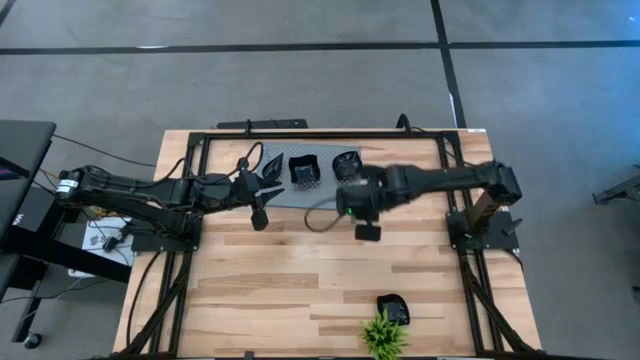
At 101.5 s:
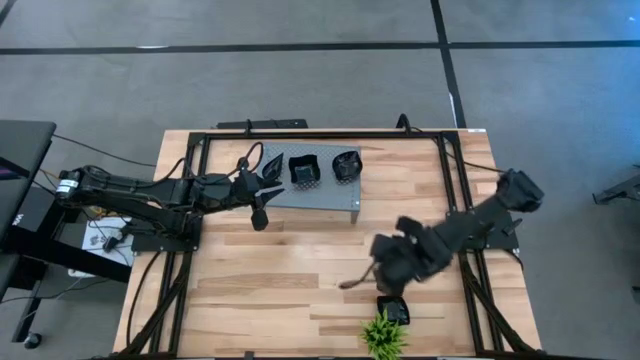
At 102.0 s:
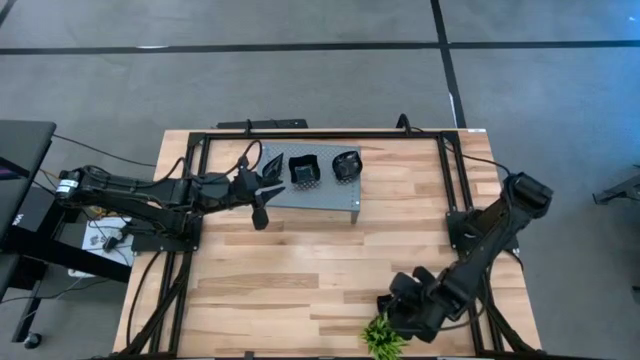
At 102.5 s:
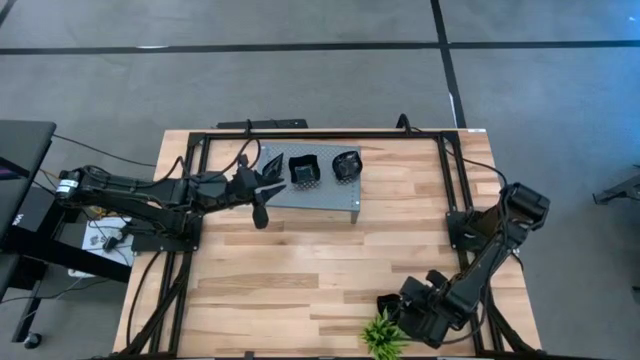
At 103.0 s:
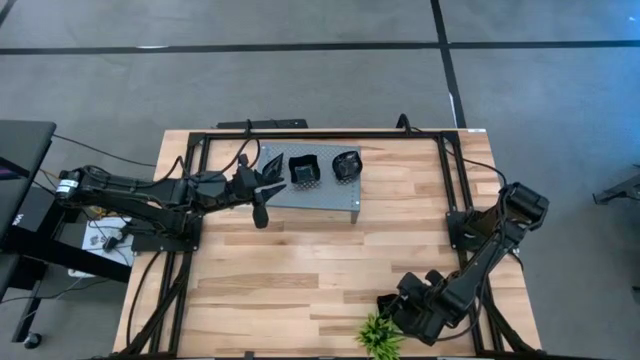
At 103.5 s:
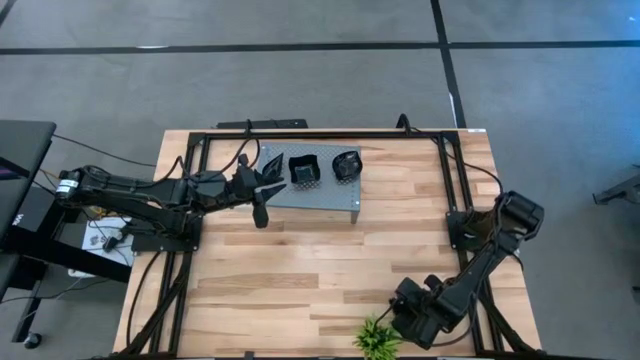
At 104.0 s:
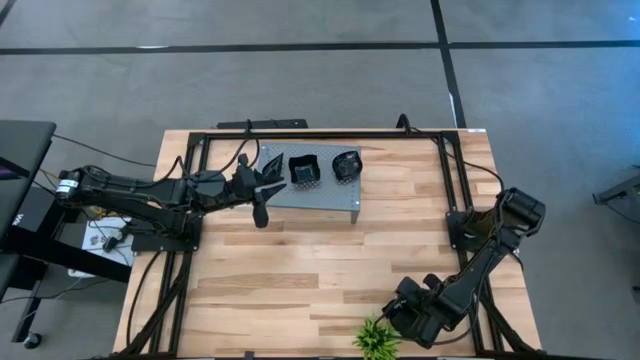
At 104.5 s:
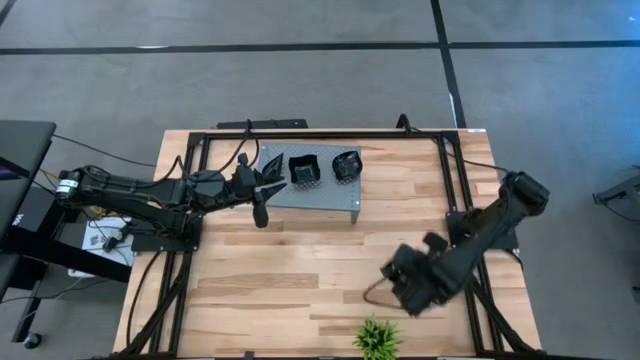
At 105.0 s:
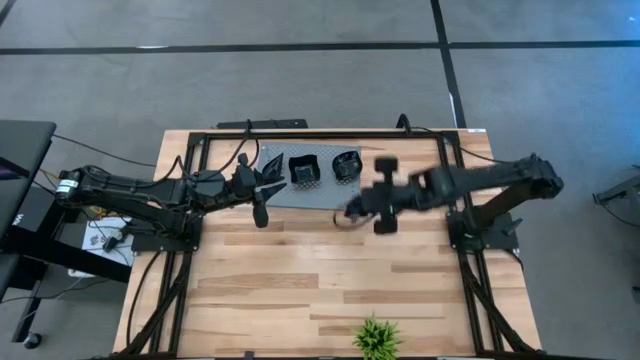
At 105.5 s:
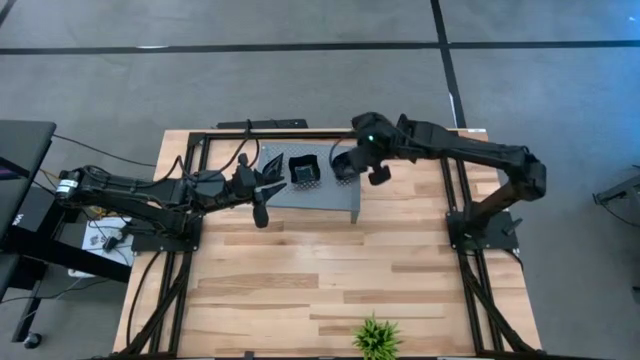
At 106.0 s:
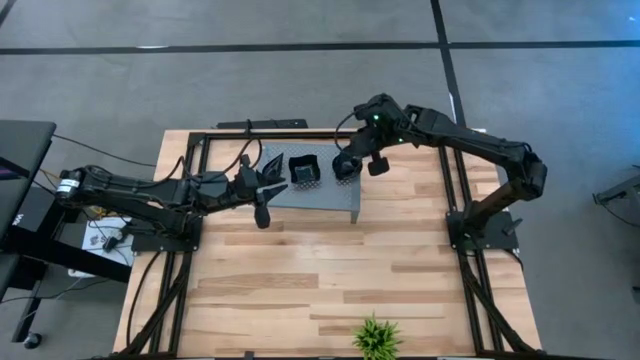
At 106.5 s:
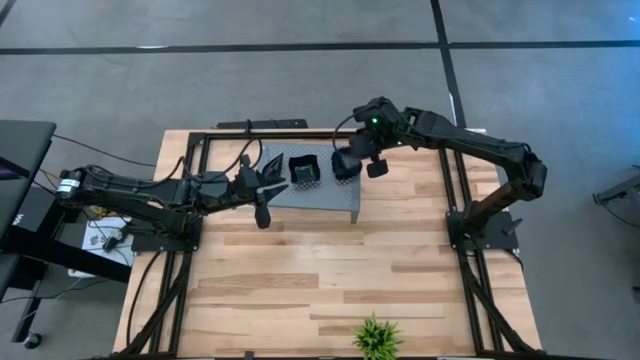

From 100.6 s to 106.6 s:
Task: Pick & Place Mini shaped plates
Stack the black leaf-shaped plate on top of the black leaf-shaped plate on the shelf

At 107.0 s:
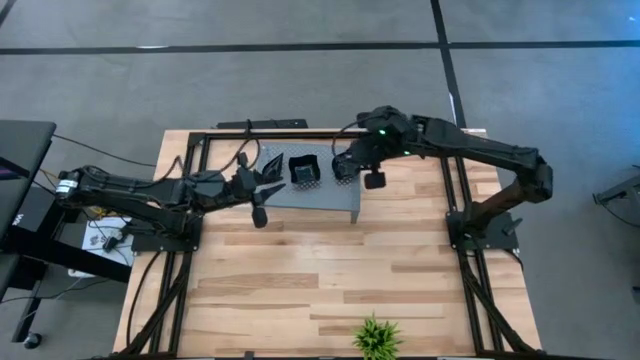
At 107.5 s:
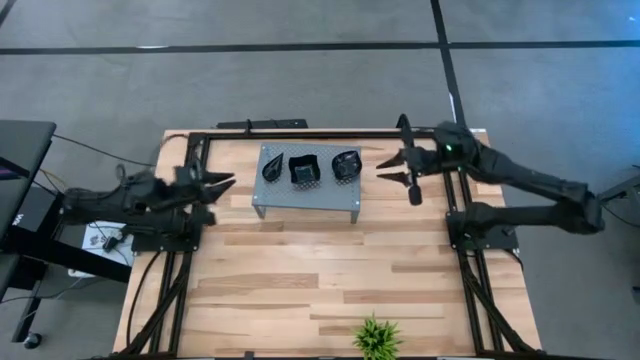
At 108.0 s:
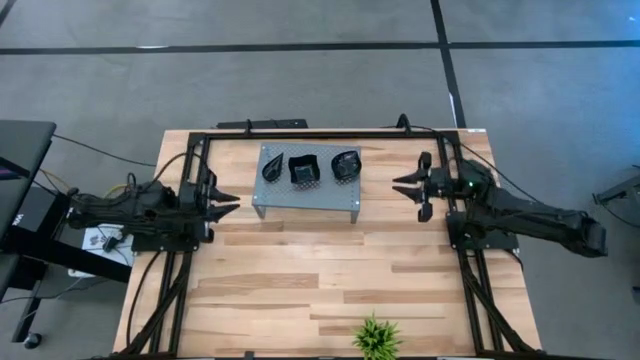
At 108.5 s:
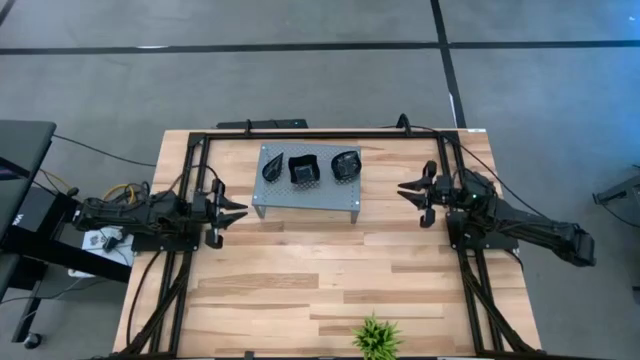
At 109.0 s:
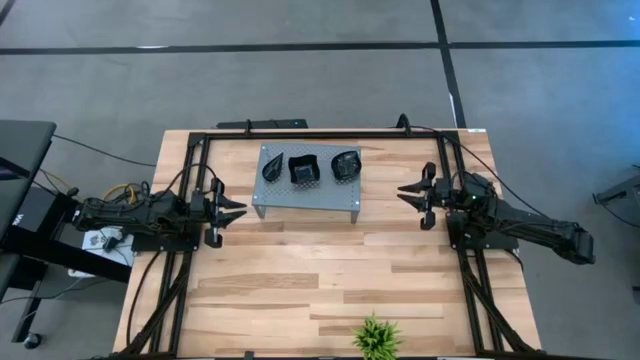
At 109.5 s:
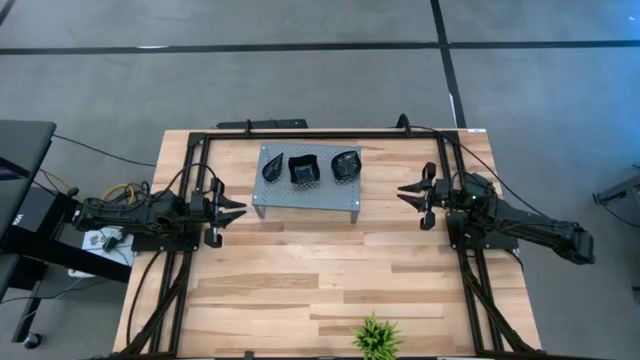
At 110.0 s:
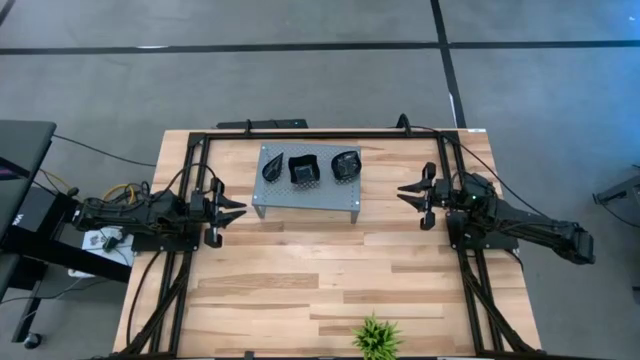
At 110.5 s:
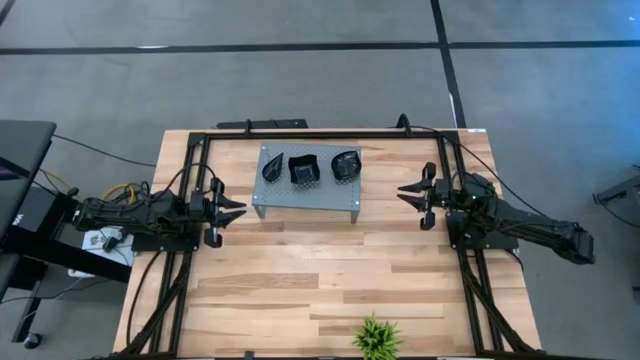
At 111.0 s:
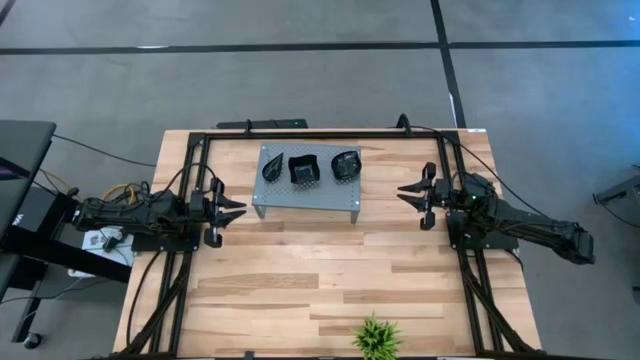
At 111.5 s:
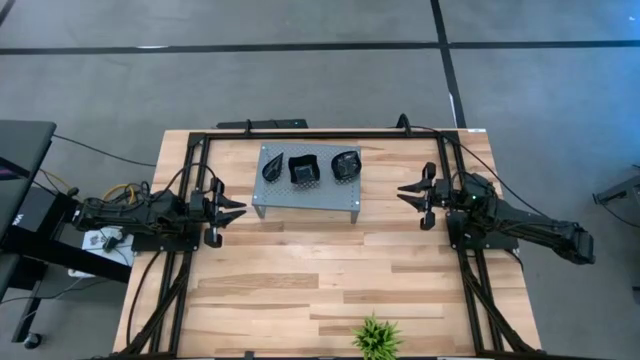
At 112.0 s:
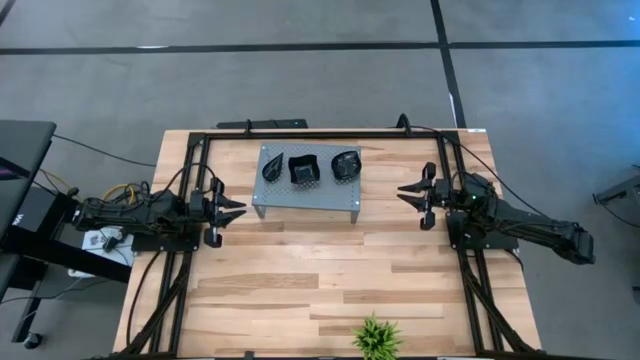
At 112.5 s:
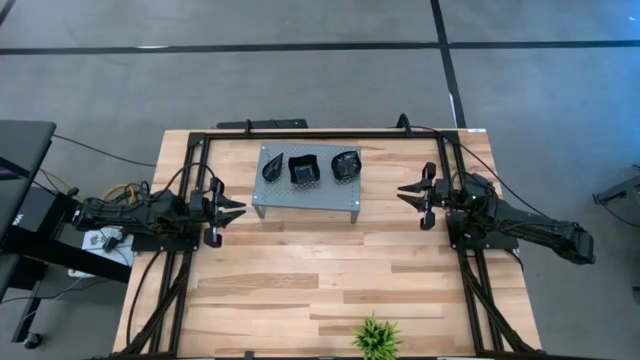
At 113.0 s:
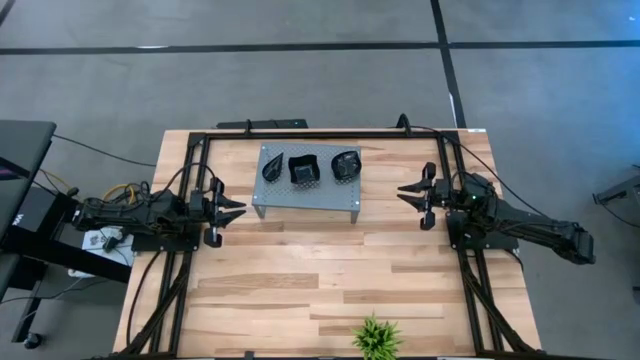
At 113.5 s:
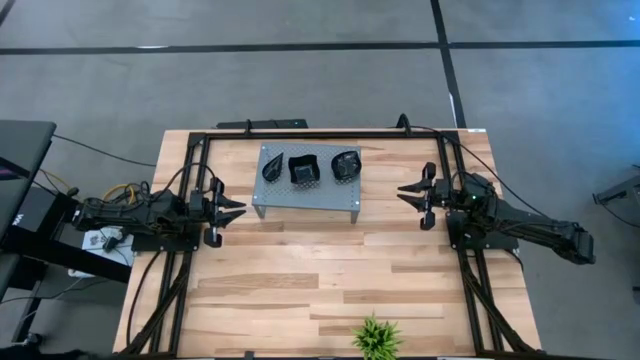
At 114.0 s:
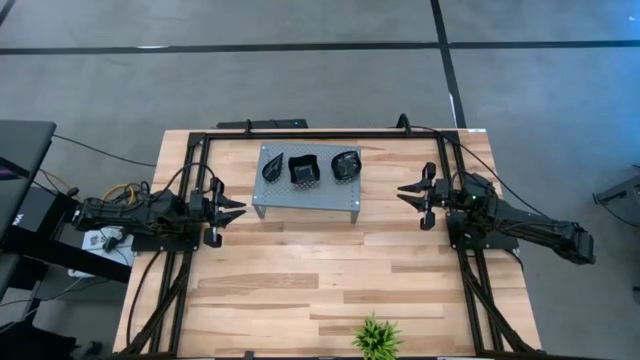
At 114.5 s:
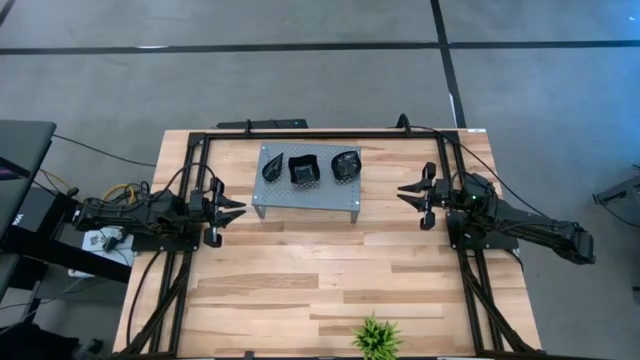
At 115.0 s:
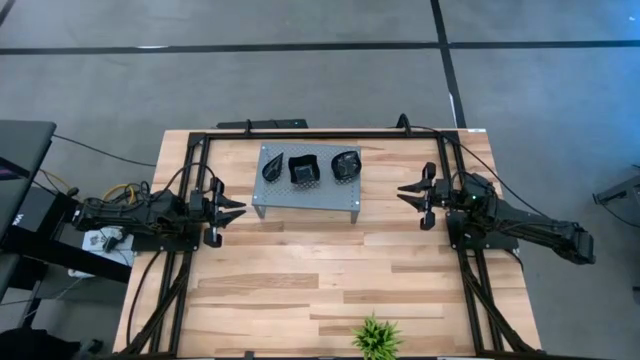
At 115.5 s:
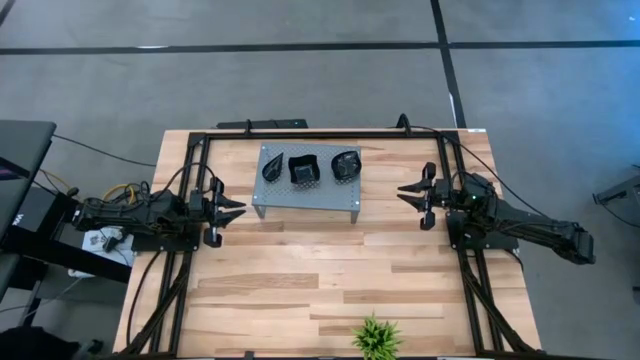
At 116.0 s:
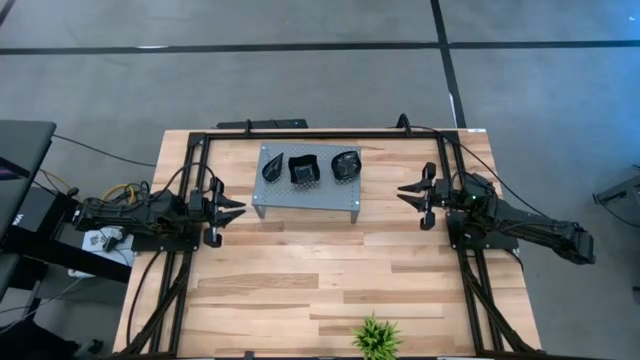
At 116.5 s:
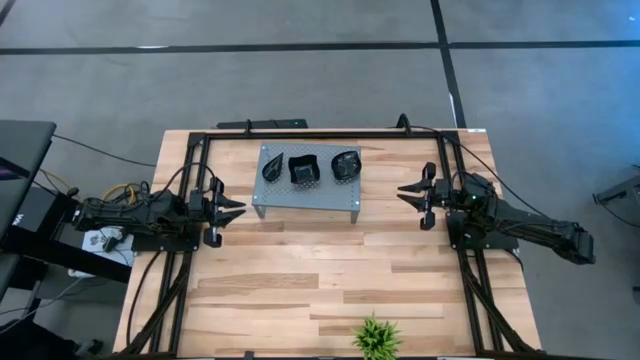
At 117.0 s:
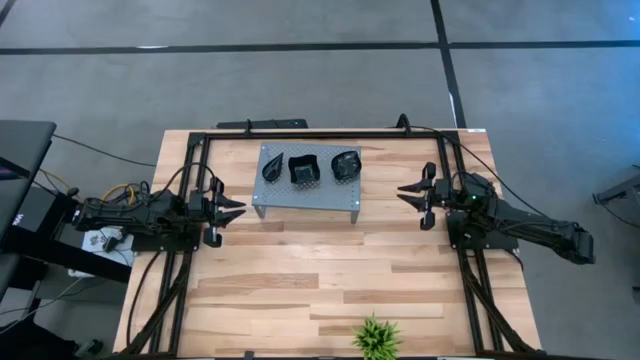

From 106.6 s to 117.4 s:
Return to Home Position

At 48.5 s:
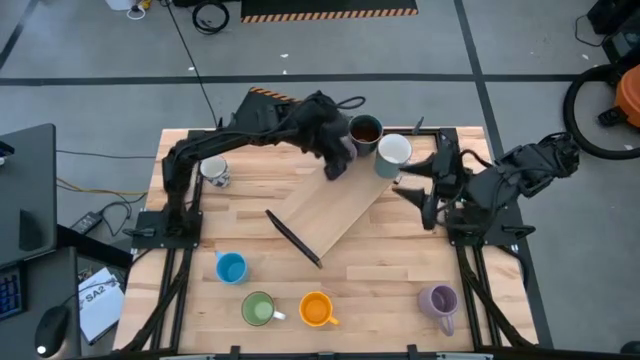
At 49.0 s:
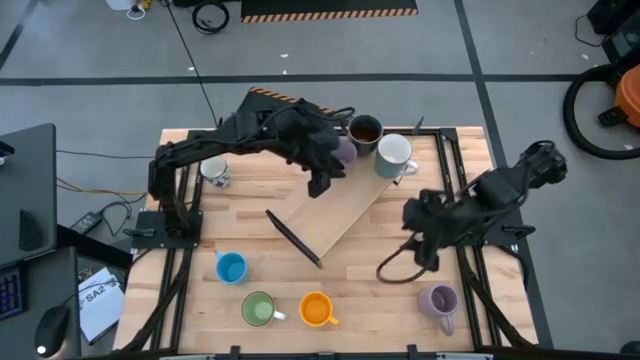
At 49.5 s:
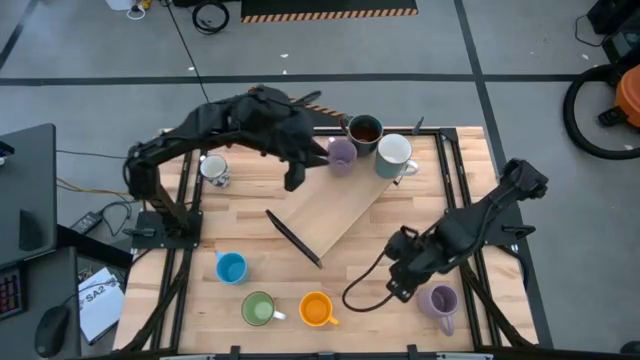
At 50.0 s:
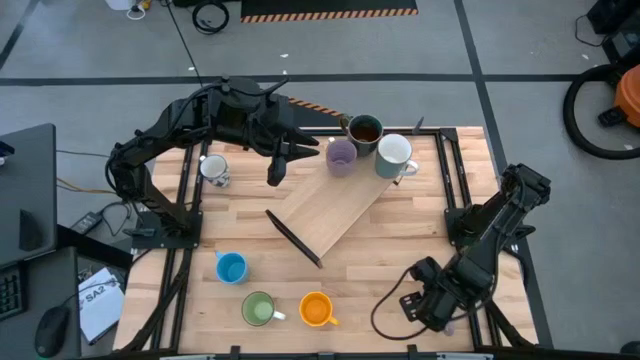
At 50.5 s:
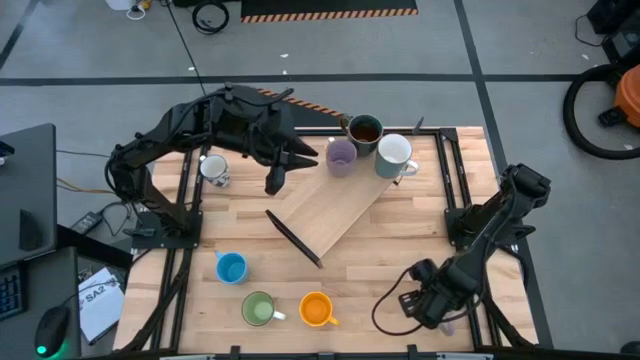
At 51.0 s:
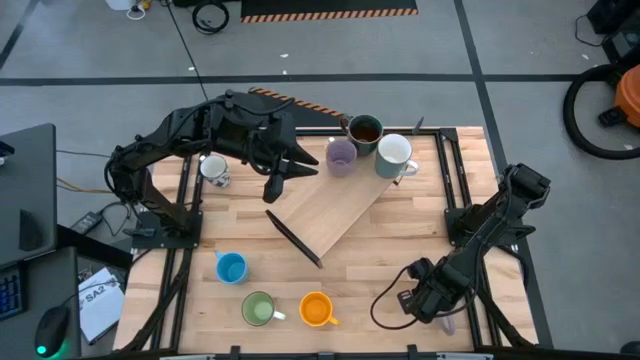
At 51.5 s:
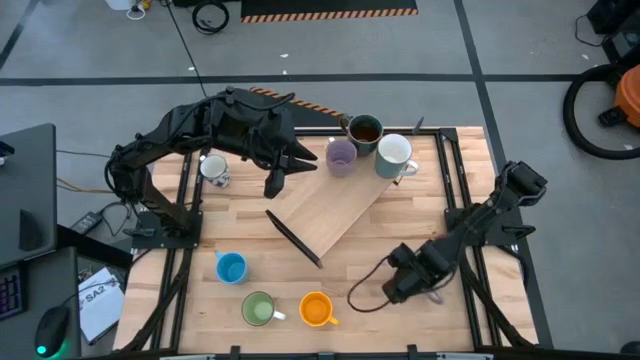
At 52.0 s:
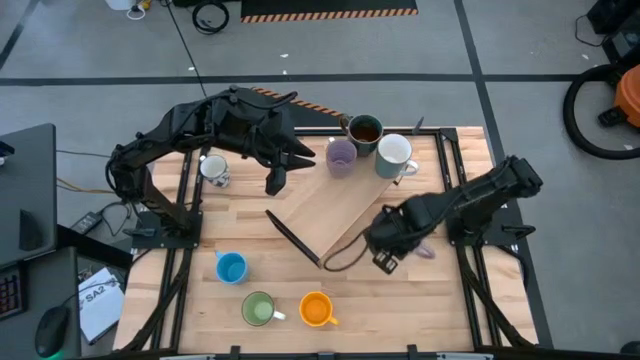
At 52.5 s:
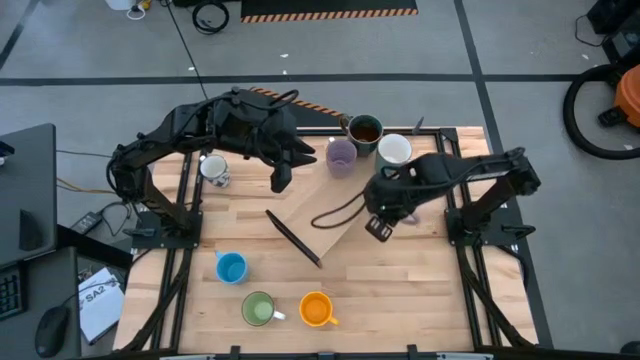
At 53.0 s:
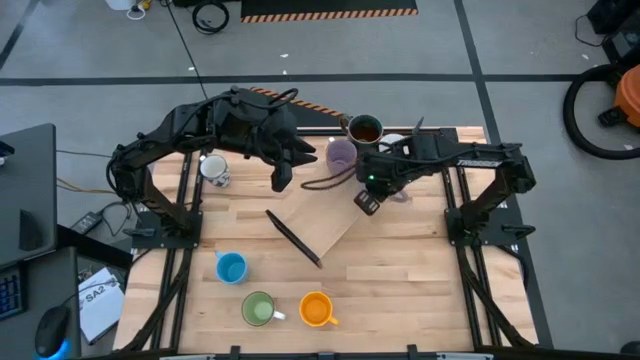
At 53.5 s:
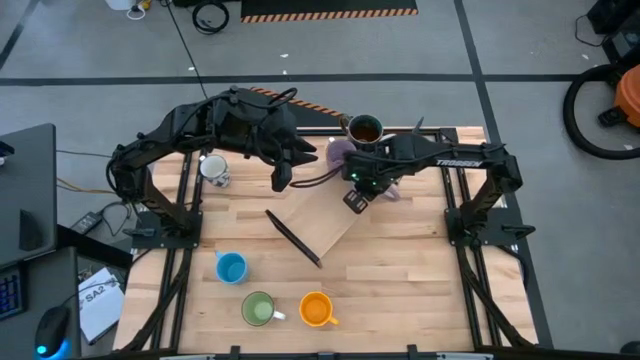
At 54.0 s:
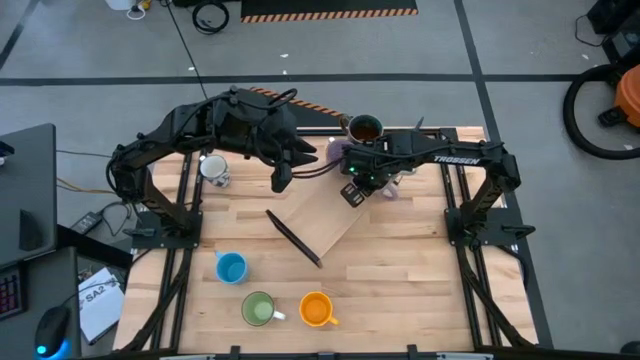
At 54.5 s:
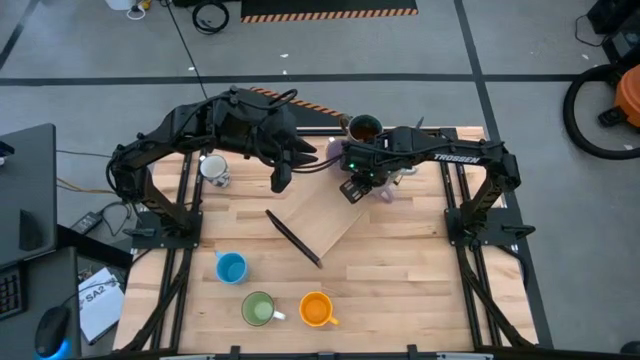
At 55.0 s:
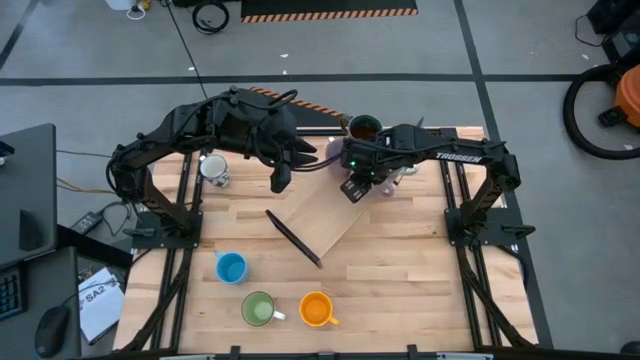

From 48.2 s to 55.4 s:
Task: Place coffee mugs
Put the violet mug on the shelf
